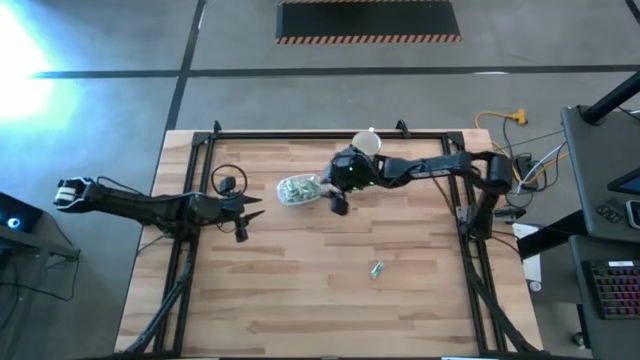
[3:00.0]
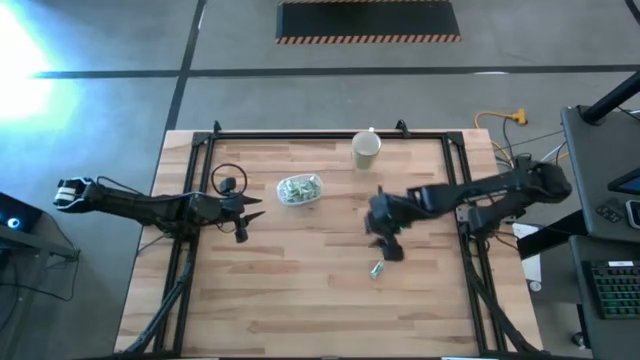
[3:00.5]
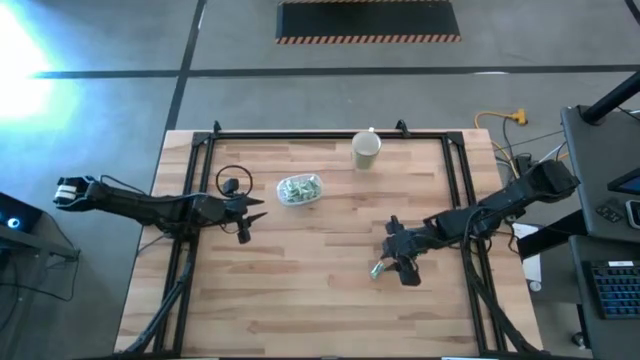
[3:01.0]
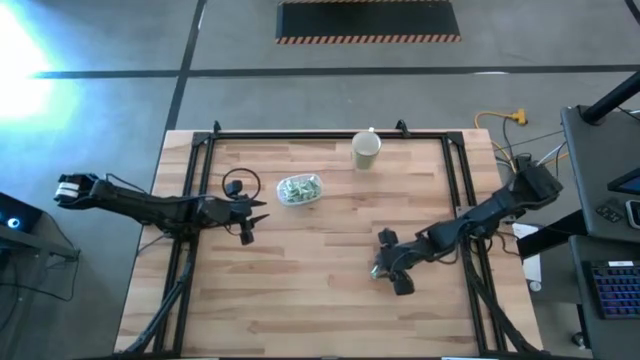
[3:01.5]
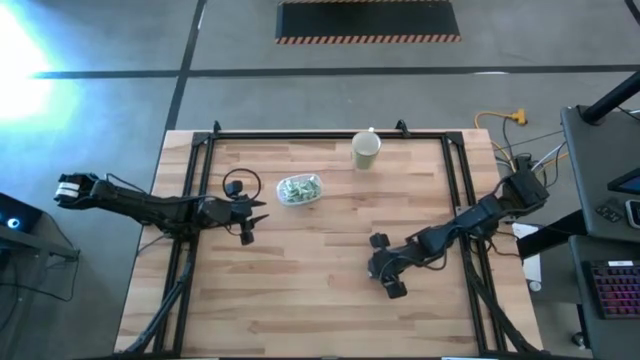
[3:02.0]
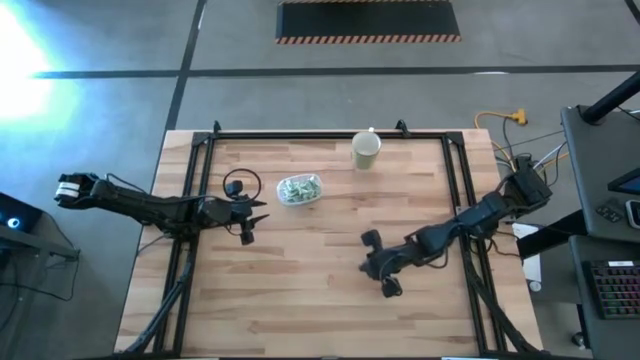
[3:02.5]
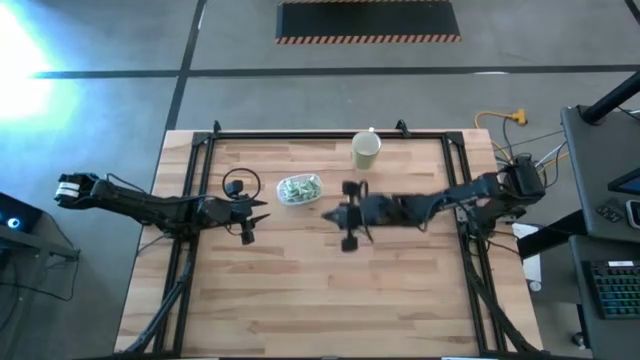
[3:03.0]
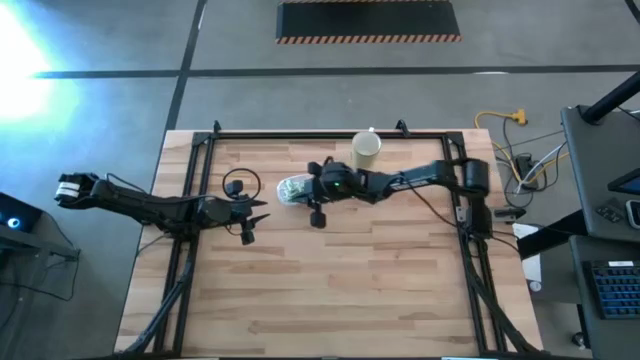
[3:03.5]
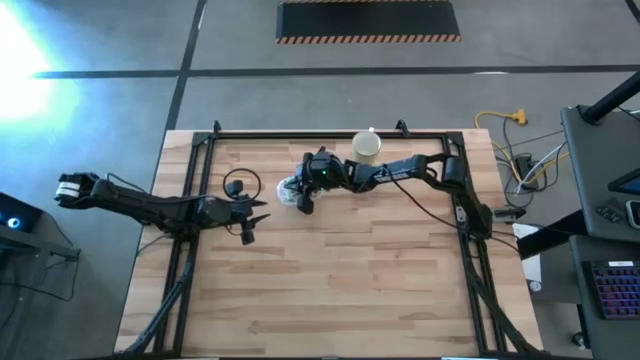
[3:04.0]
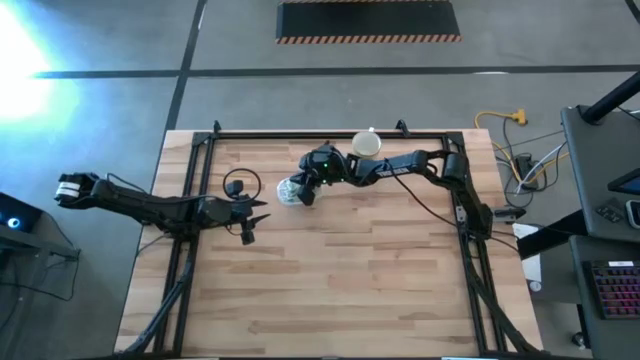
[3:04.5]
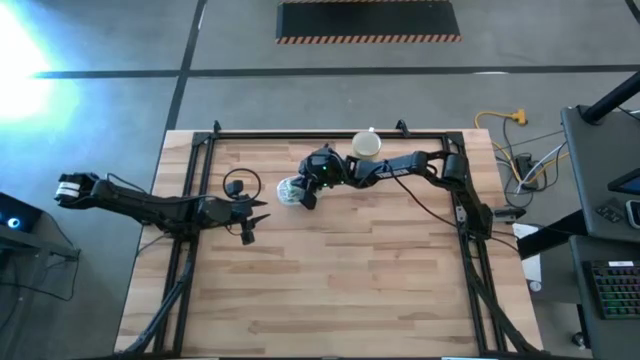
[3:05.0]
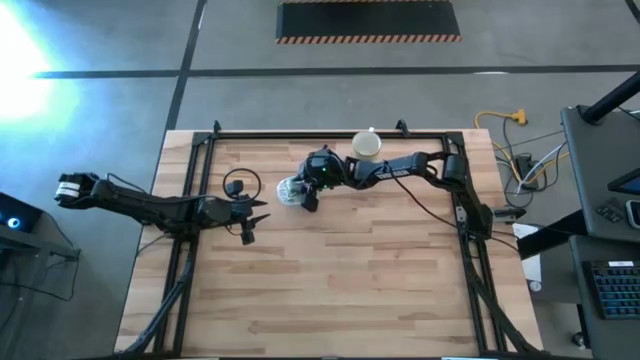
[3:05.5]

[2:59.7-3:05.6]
Task: Pick and place Stevia / Truvia into bins
Put the stevia packet into the transparent container

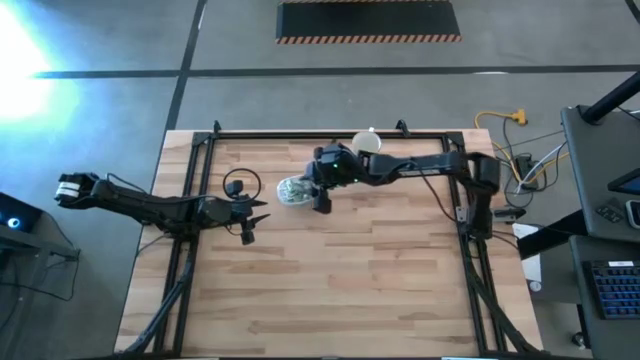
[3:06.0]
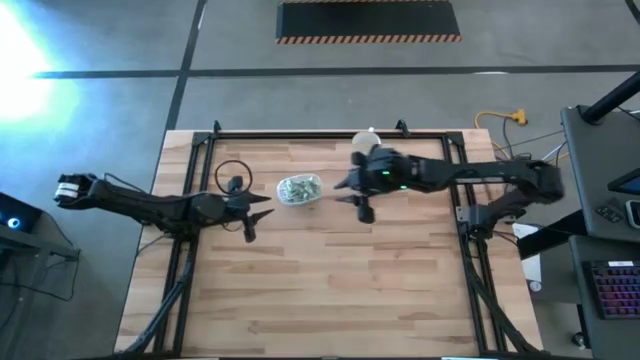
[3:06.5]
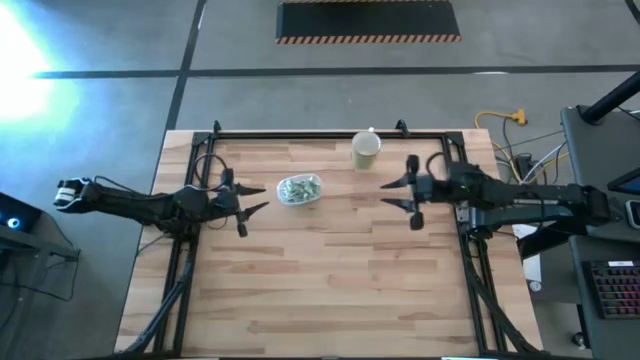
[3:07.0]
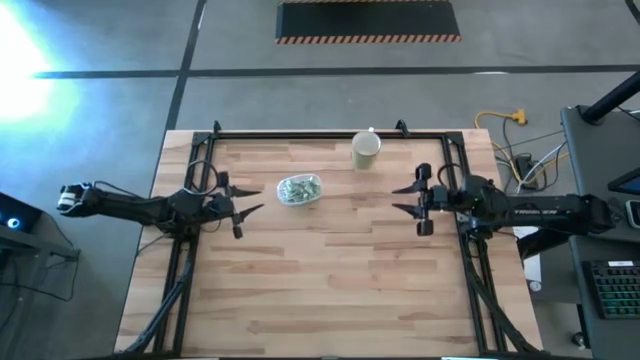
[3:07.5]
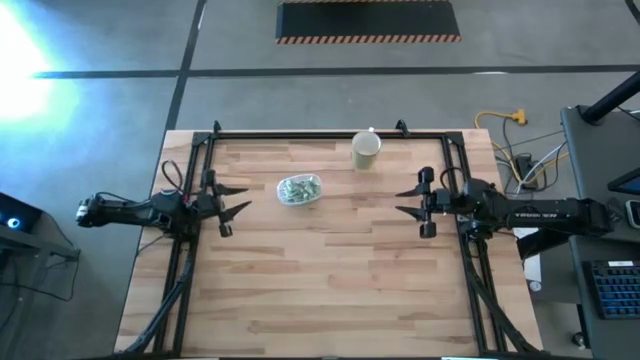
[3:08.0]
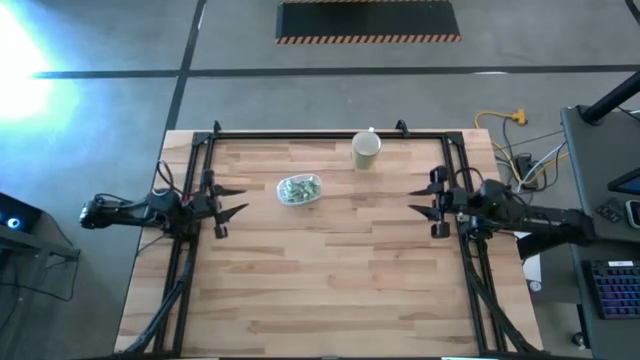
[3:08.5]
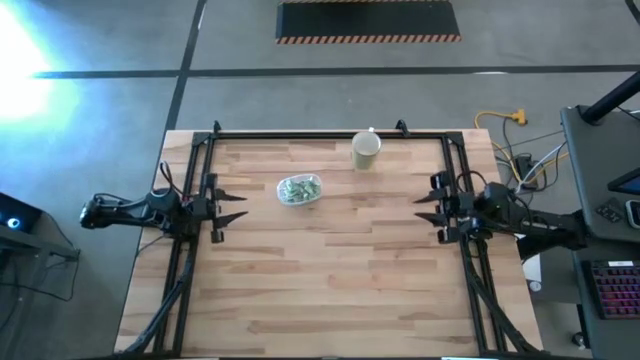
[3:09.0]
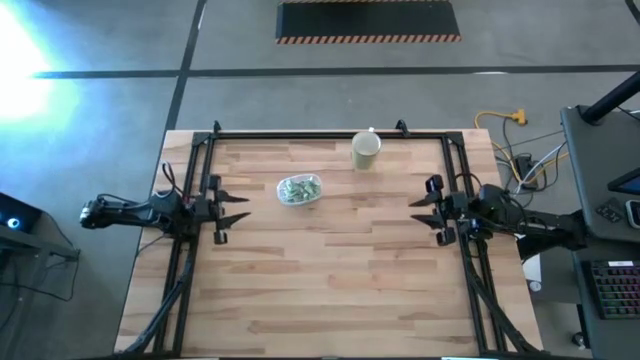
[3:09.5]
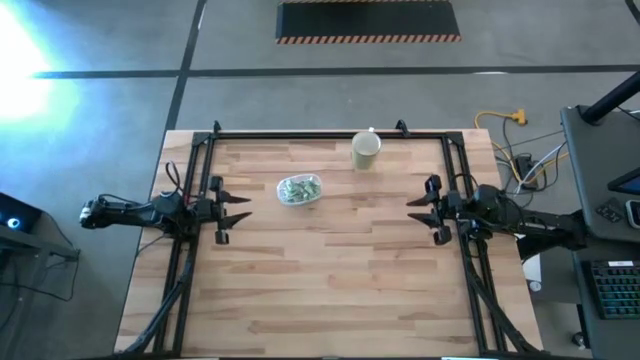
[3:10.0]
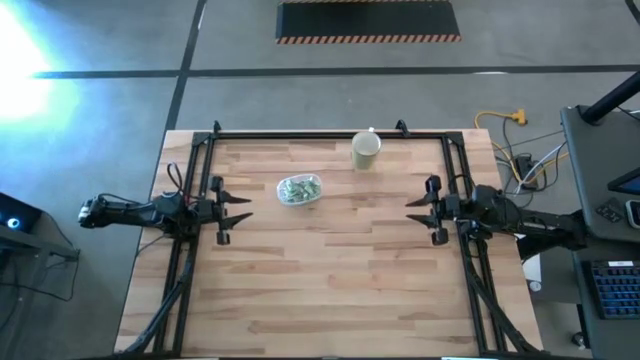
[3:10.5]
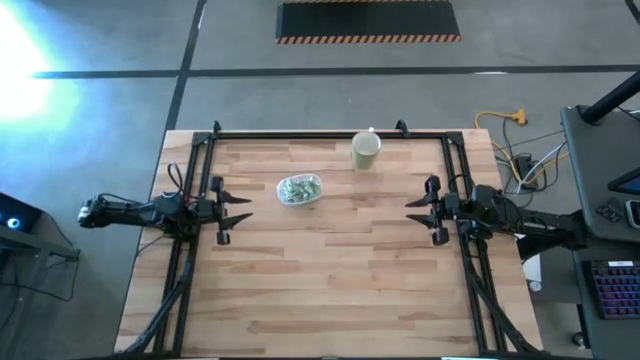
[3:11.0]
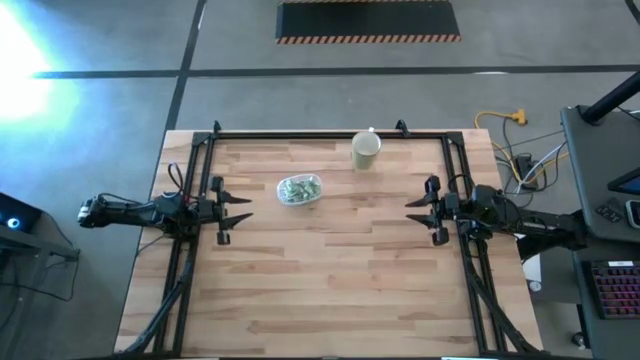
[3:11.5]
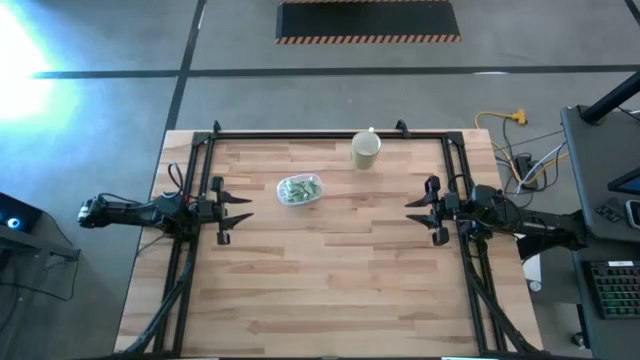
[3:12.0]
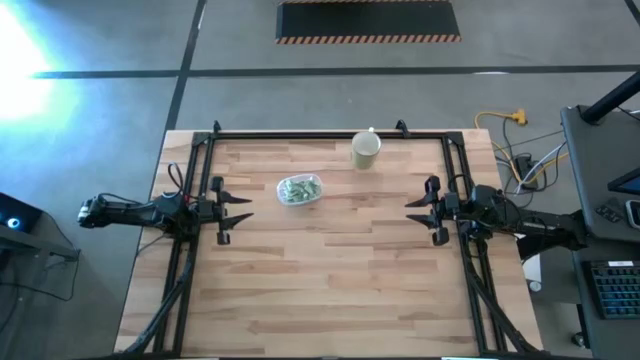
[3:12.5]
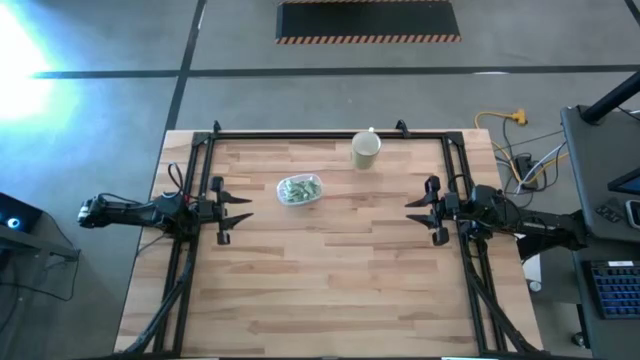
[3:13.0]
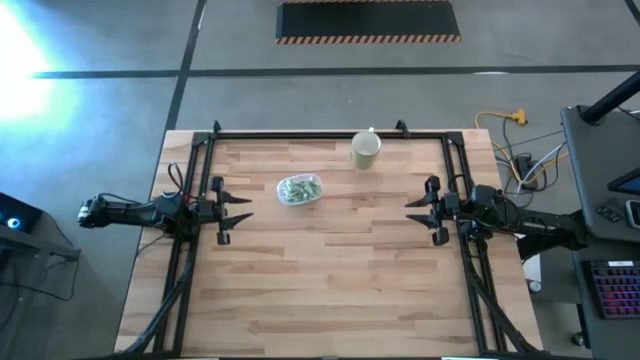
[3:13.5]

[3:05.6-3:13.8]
Return to Home Position

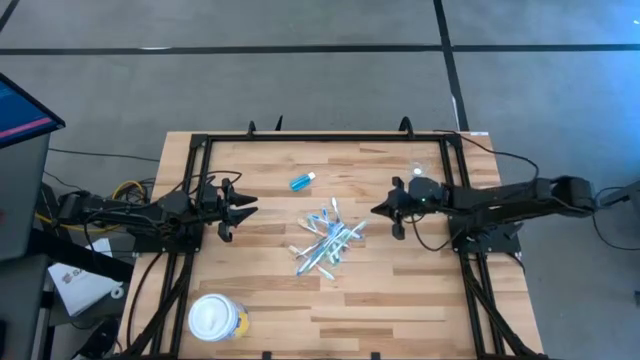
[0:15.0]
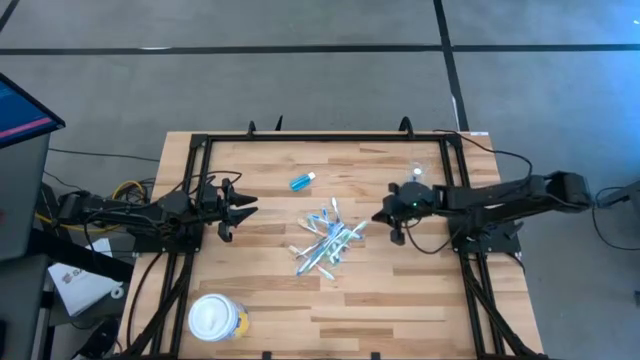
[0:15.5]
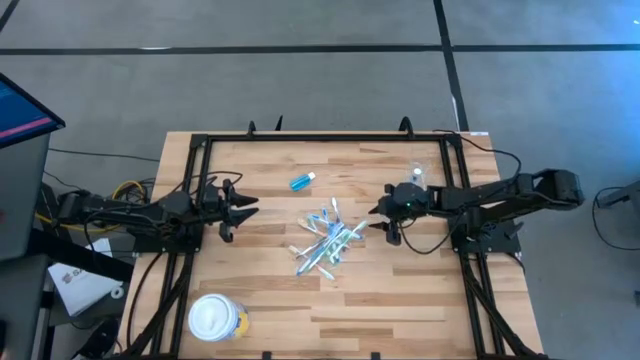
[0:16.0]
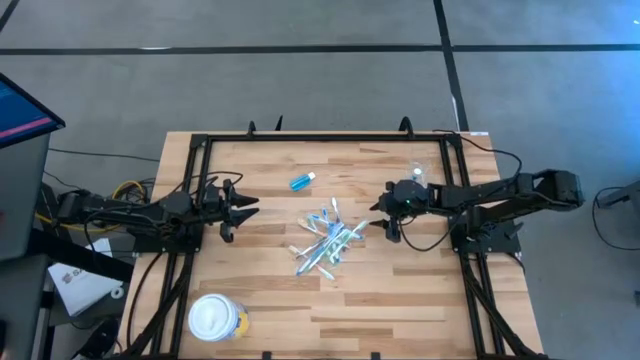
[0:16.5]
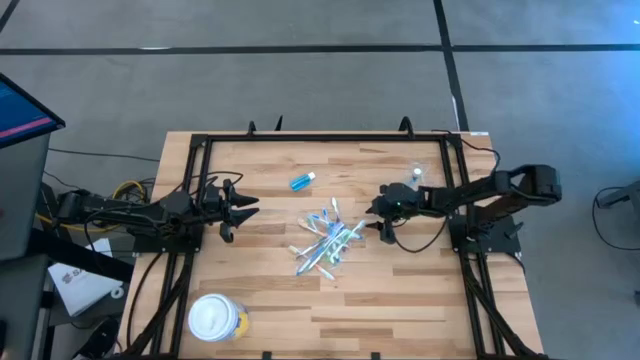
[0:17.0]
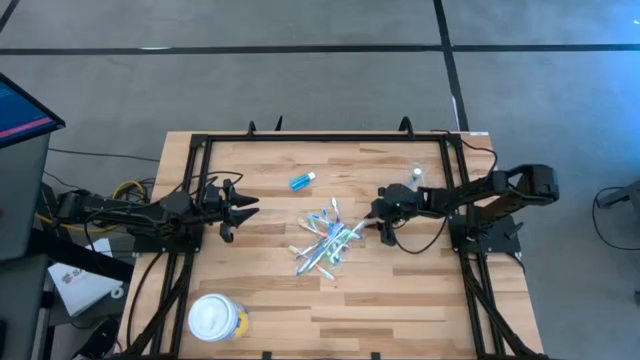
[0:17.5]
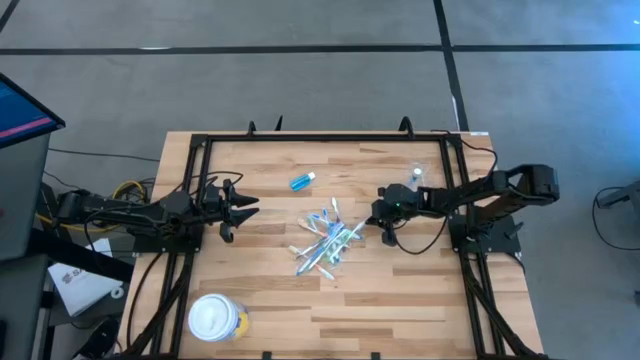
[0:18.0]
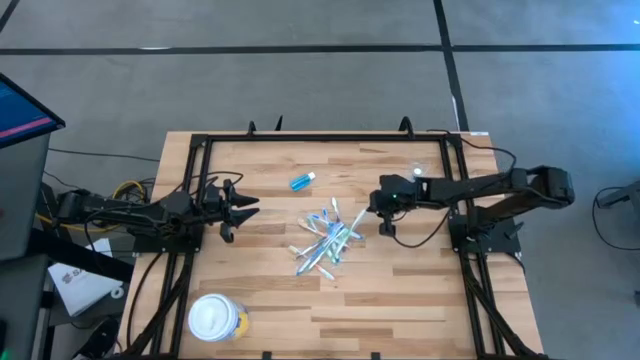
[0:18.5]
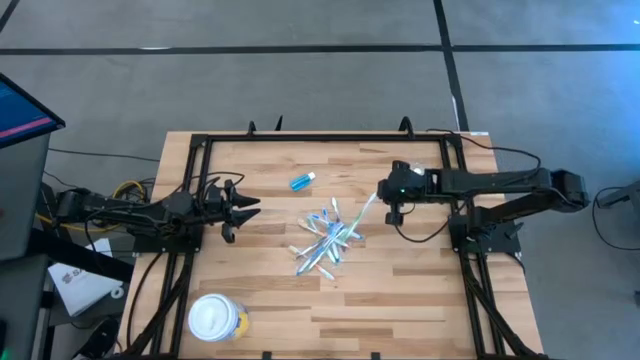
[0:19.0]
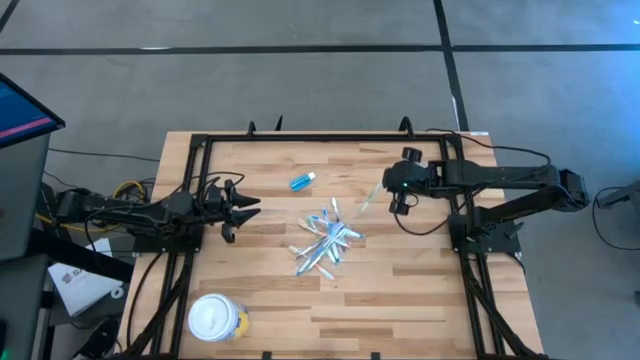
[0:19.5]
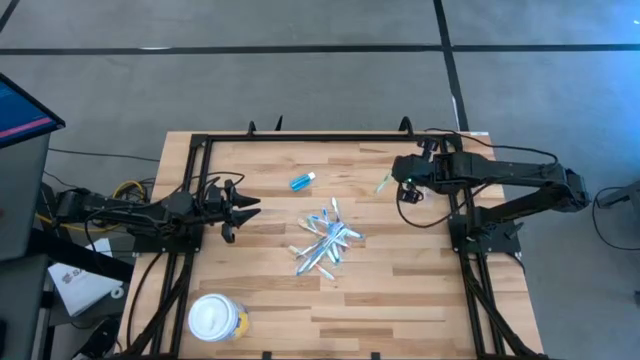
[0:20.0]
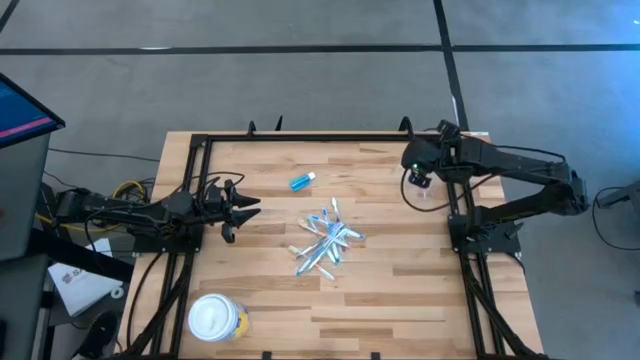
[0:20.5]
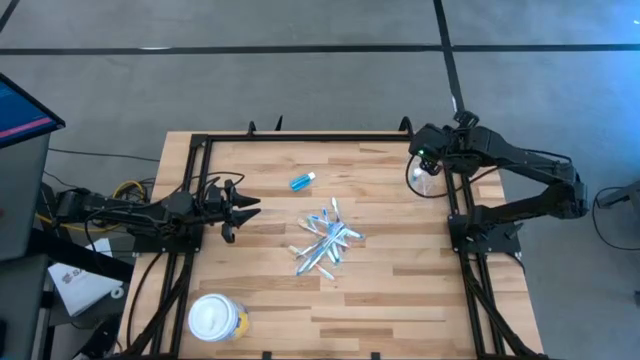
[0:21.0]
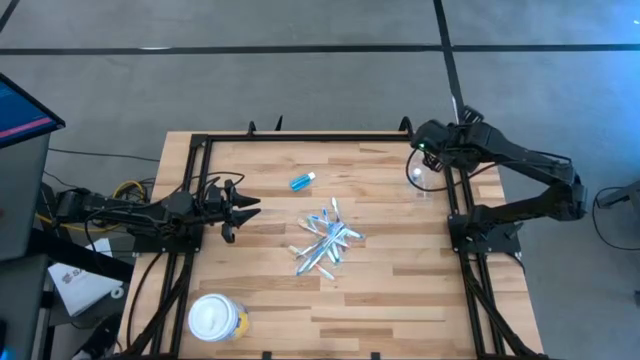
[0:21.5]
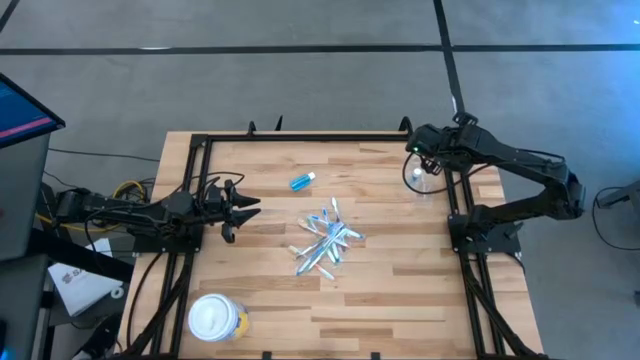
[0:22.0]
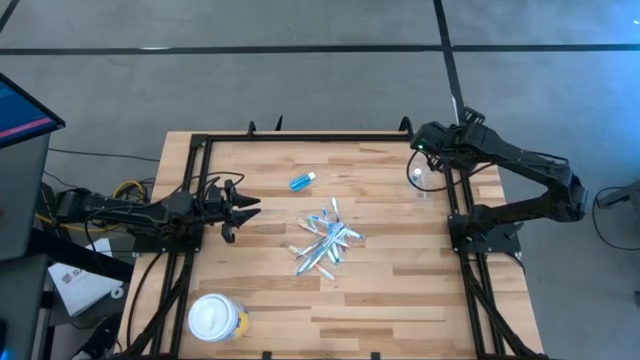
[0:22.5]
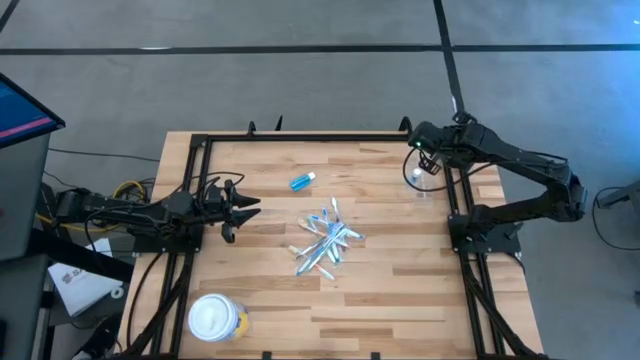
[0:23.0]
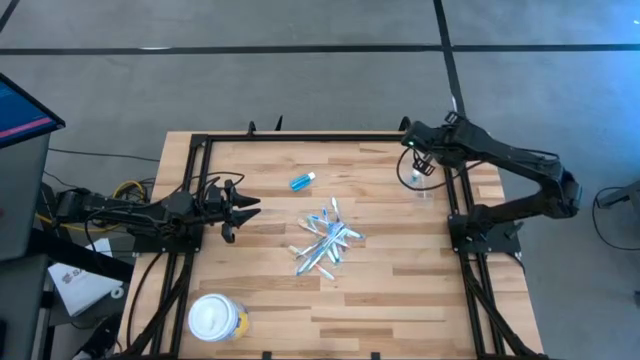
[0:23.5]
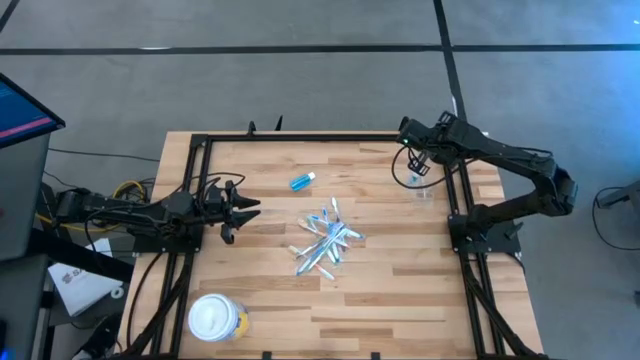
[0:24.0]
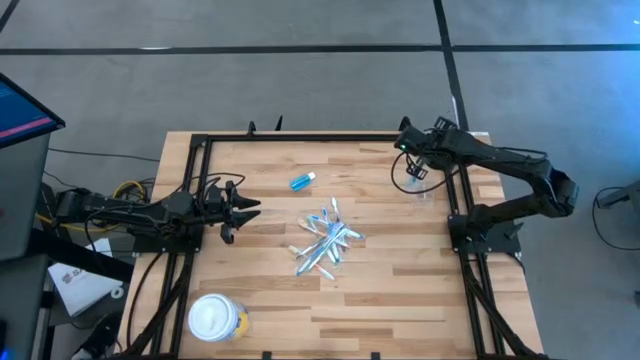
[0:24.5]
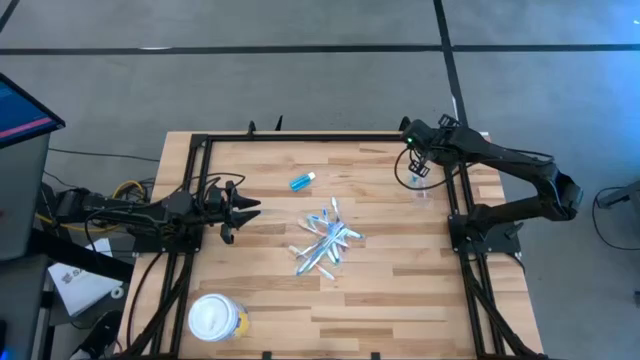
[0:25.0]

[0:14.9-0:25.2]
Task: Pick & Place toothbrushing station
Put the green toothbrush into the transparent organizer
